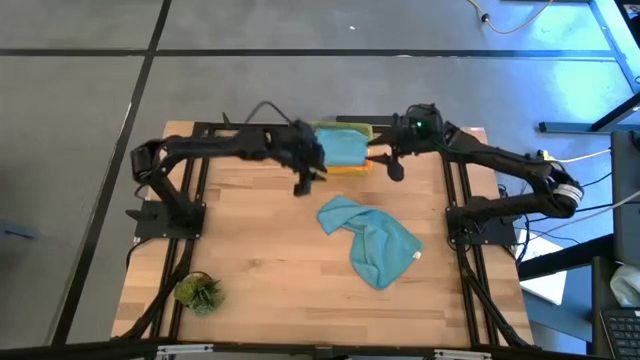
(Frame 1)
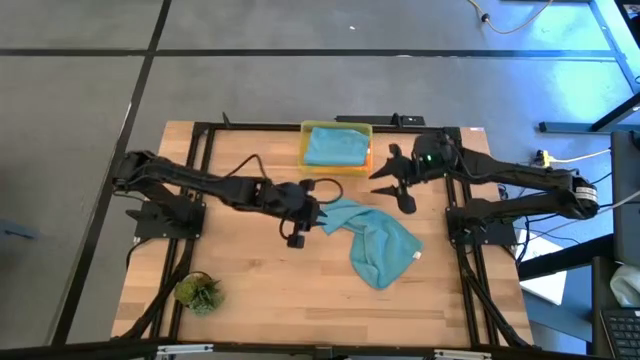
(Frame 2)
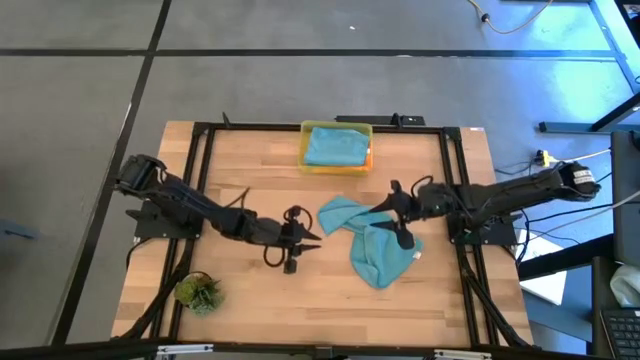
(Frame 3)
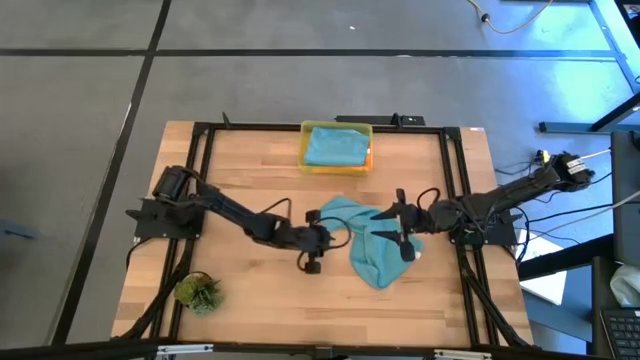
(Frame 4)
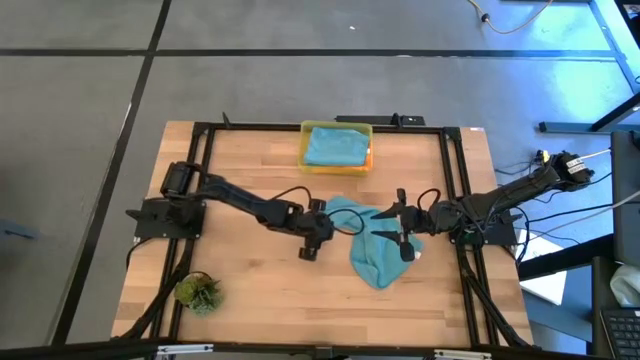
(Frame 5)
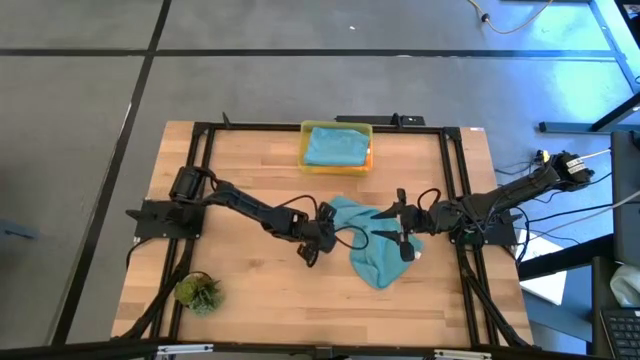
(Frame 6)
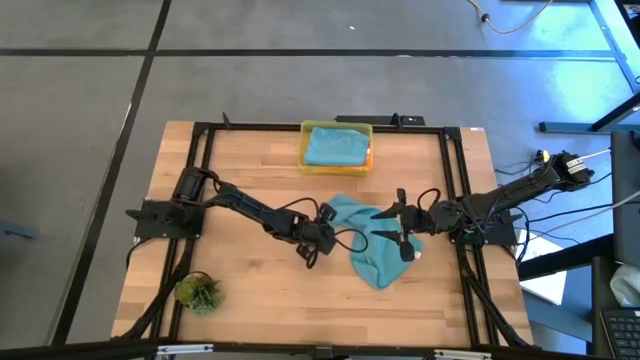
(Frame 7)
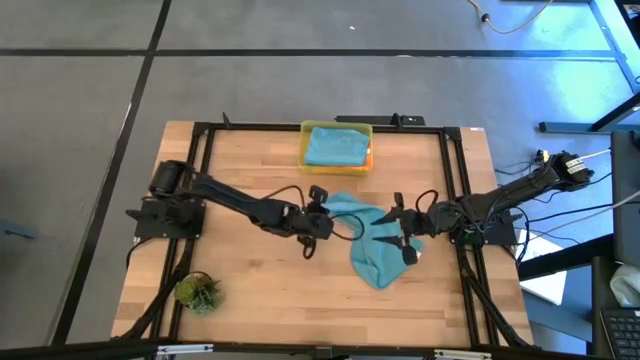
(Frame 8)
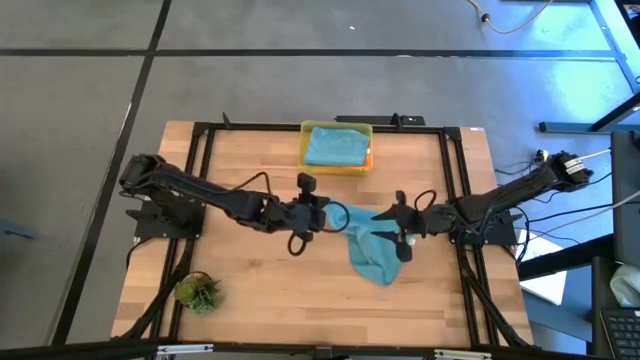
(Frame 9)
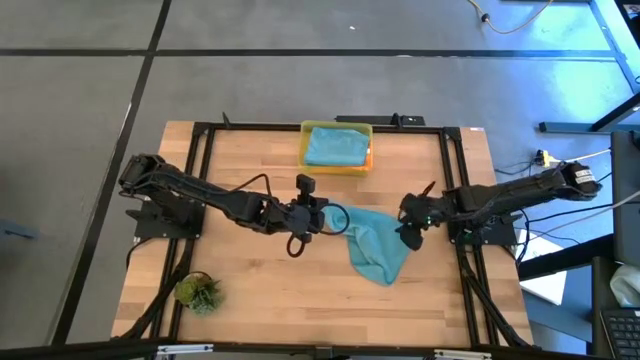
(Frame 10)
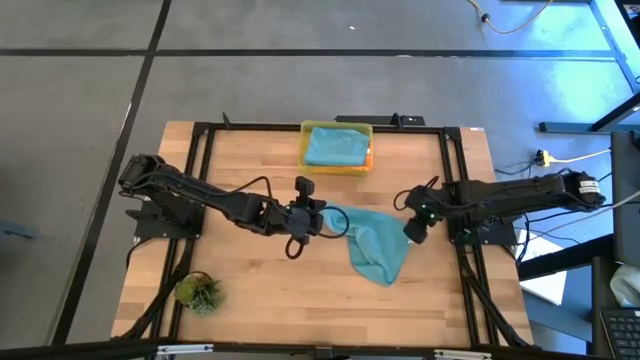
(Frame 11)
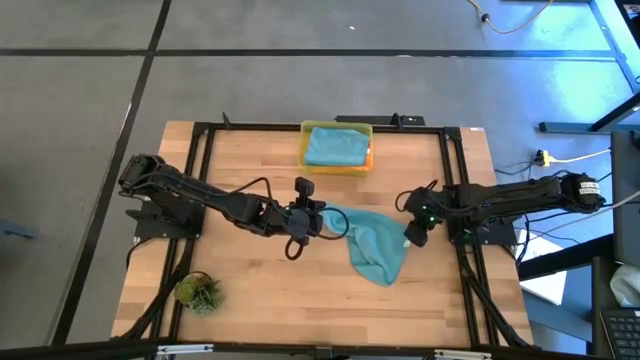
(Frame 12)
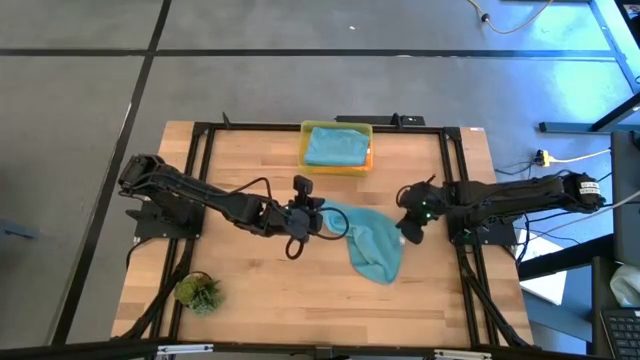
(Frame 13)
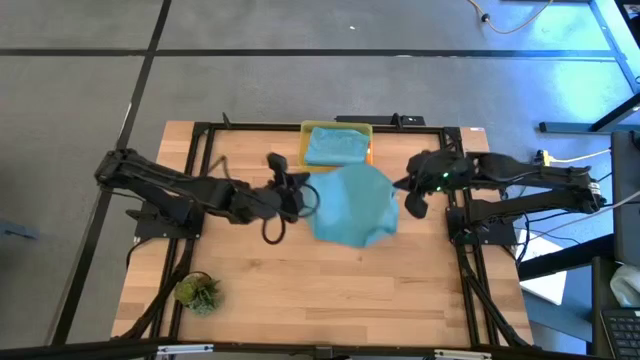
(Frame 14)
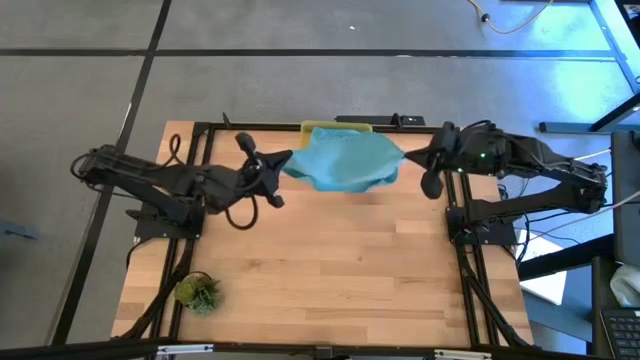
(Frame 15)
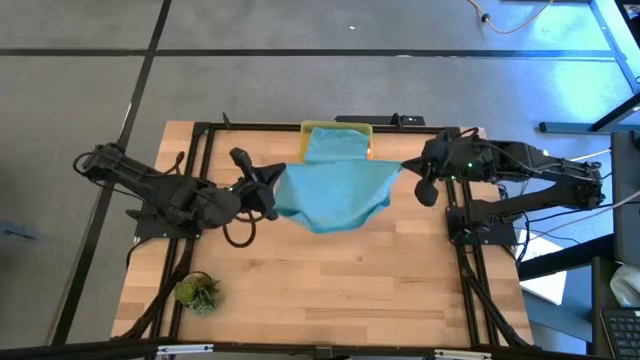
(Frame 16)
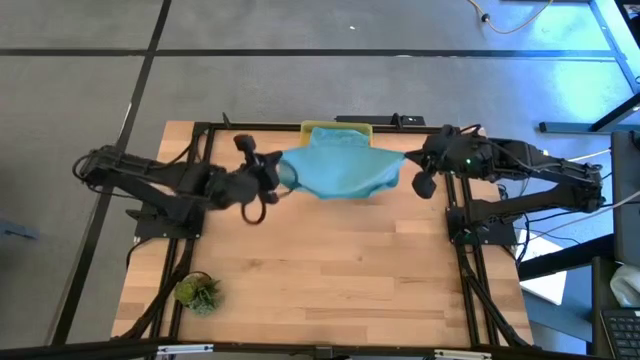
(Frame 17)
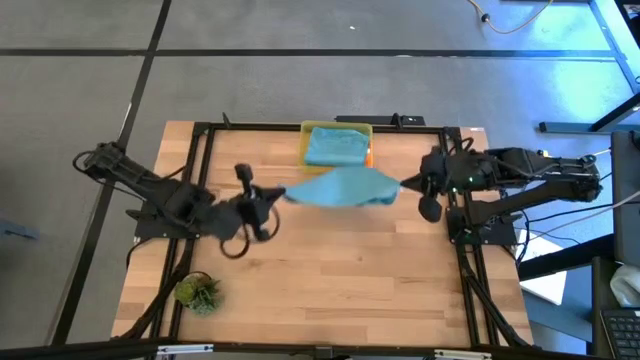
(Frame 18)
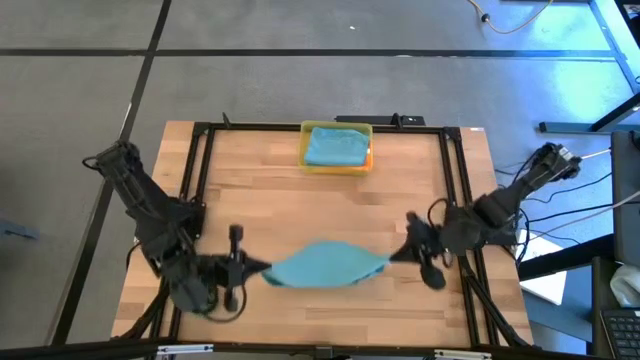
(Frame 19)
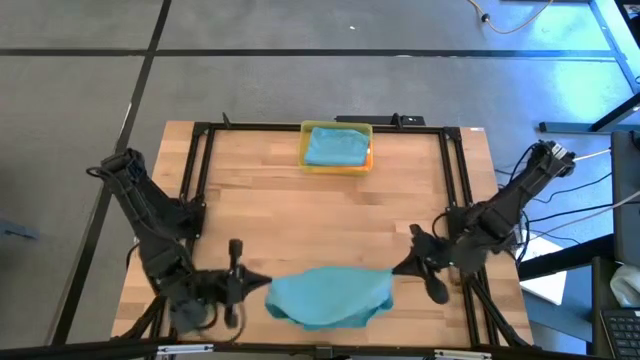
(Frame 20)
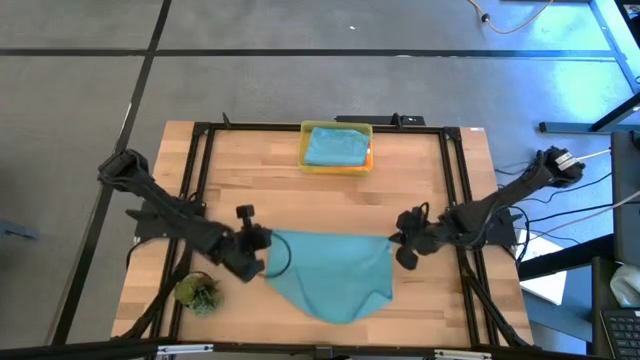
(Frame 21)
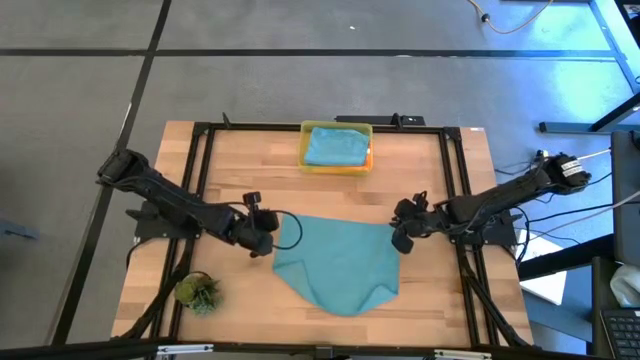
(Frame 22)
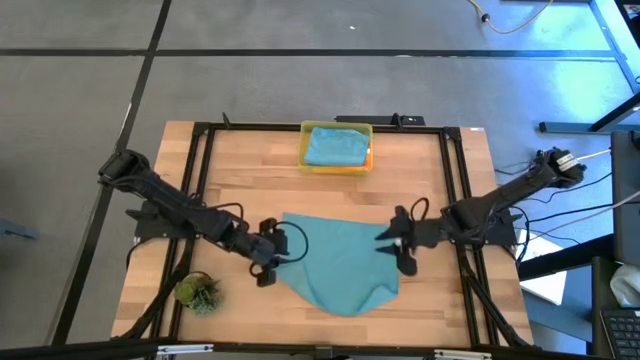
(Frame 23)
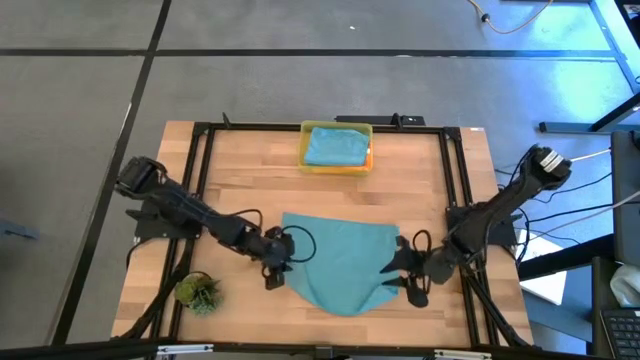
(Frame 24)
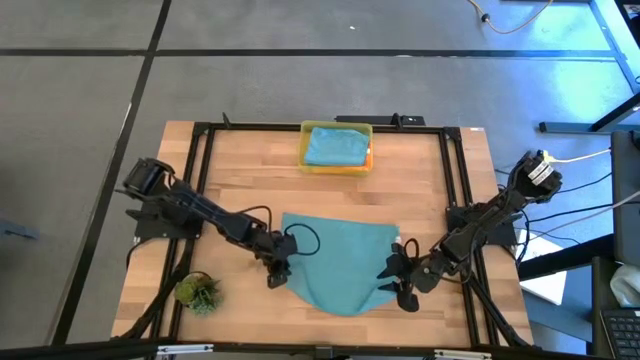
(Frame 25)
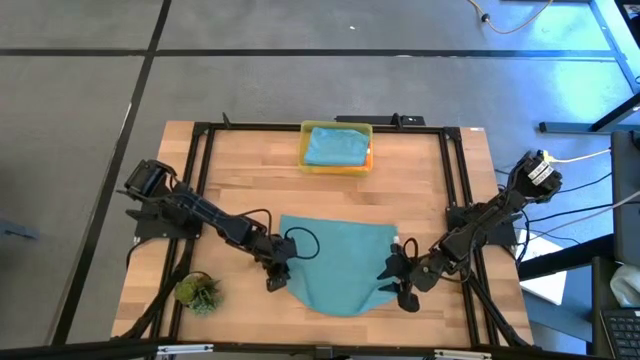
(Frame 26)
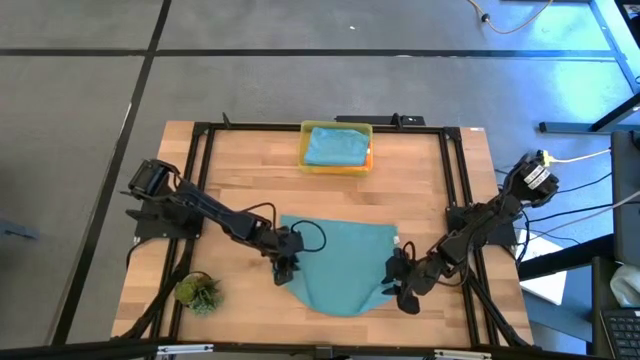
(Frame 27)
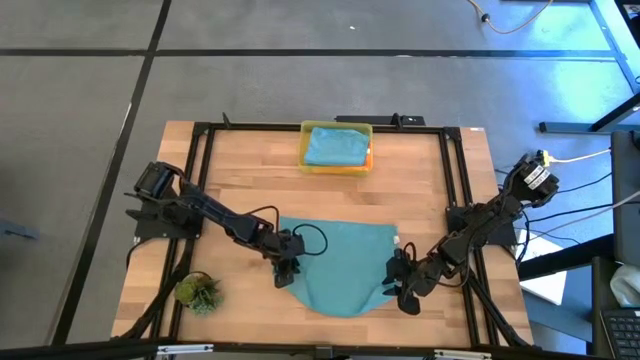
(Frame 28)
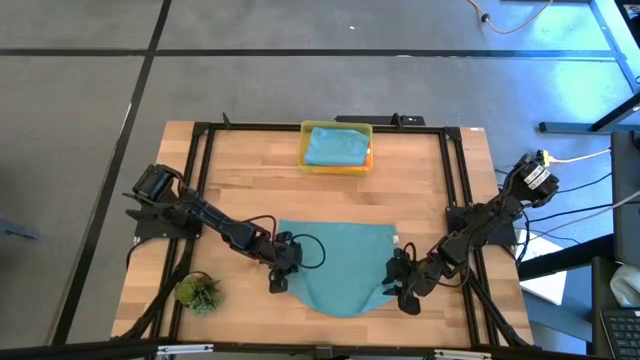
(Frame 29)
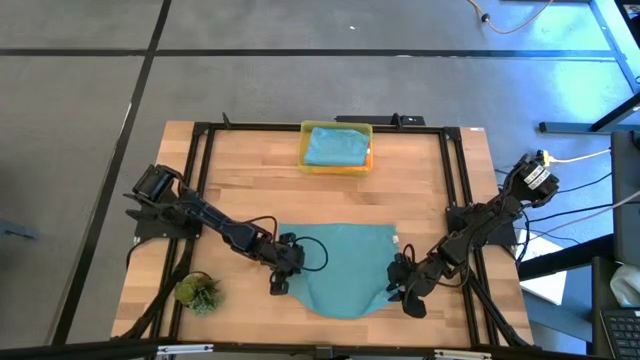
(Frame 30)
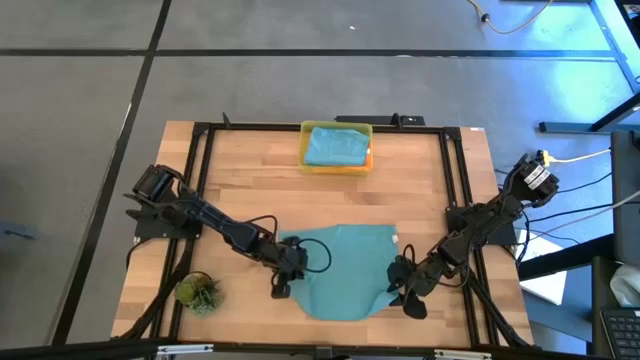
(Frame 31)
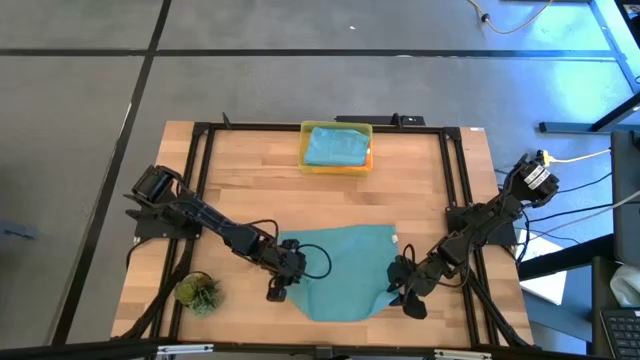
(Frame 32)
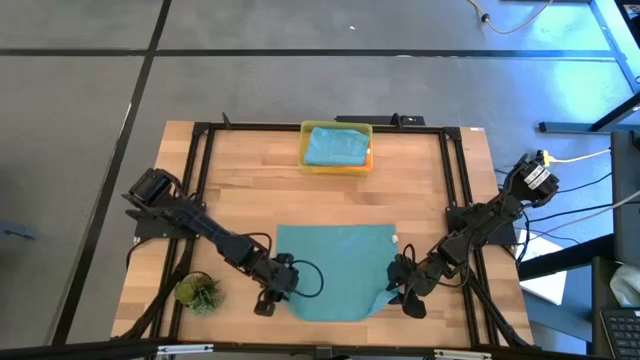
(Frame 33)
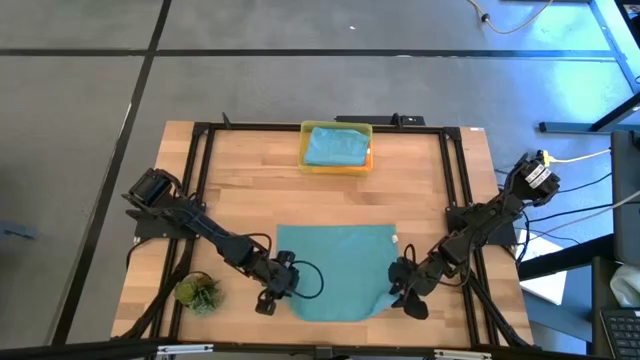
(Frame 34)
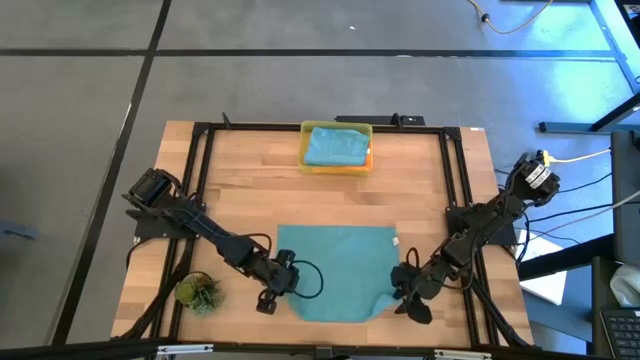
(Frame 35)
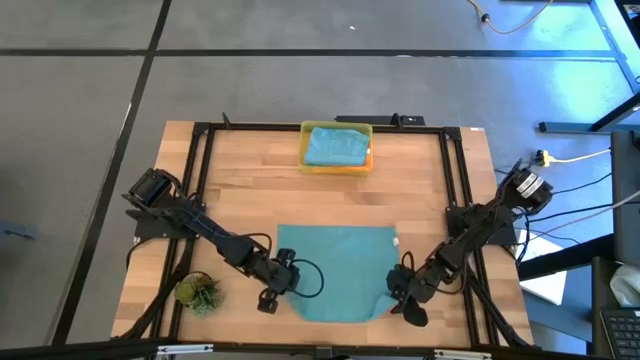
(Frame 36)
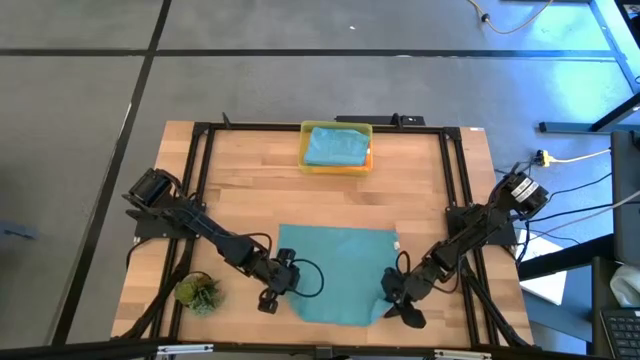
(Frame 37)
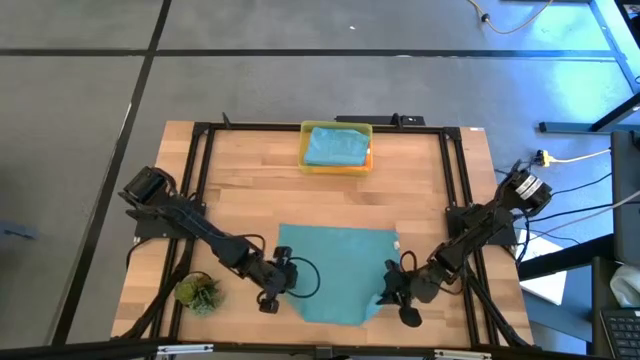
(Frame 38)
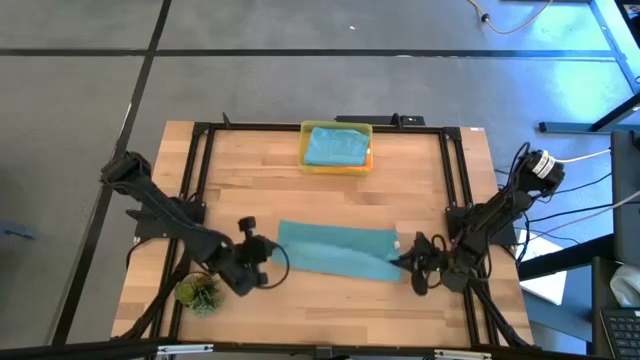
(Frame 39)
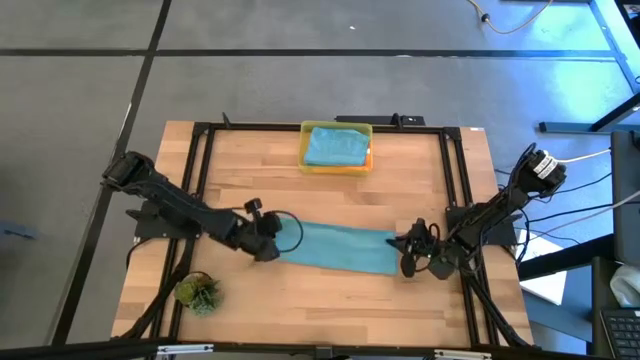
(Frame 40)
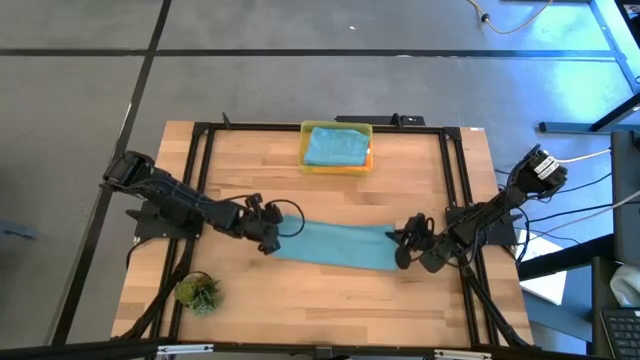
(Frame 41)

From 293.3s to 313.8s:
Task: Fold microfiber towels
Fold the blue microfiber cloth
